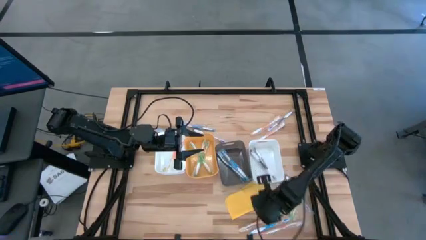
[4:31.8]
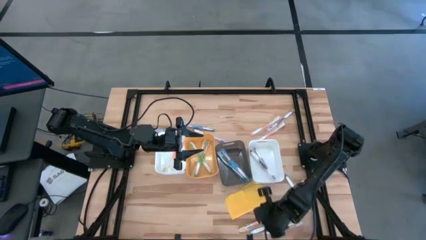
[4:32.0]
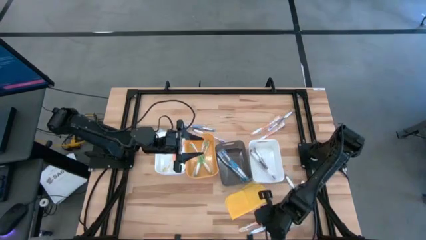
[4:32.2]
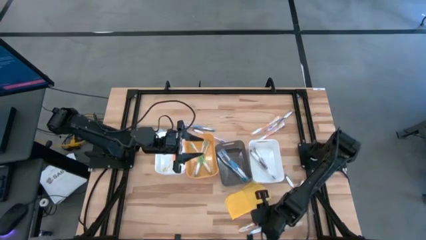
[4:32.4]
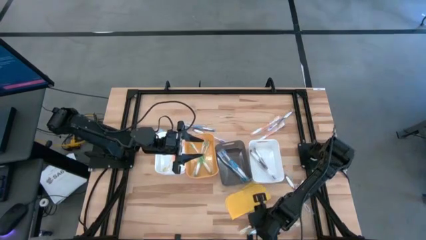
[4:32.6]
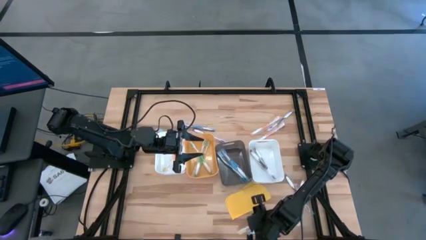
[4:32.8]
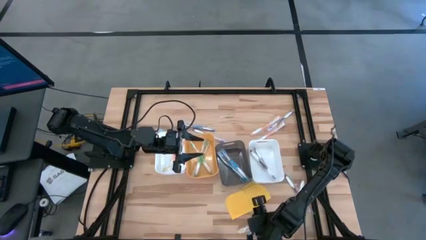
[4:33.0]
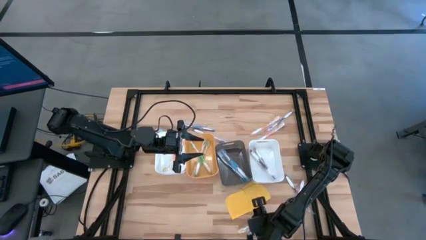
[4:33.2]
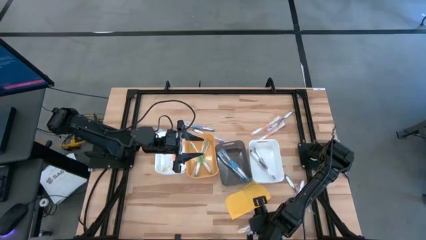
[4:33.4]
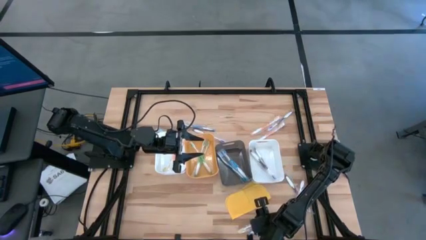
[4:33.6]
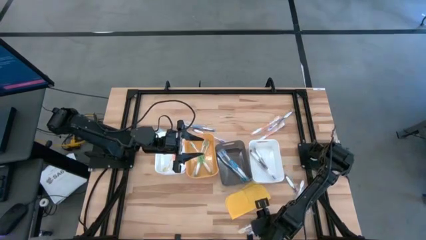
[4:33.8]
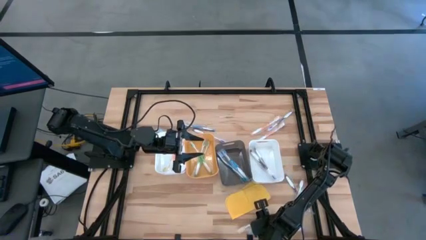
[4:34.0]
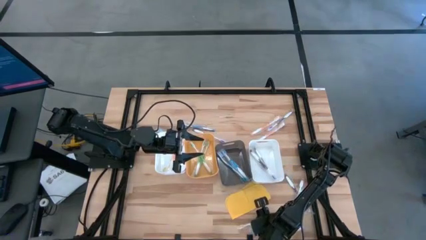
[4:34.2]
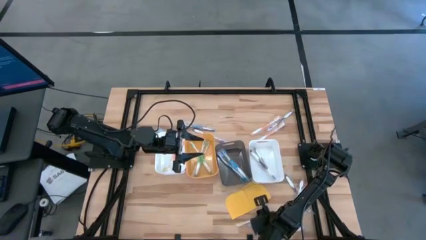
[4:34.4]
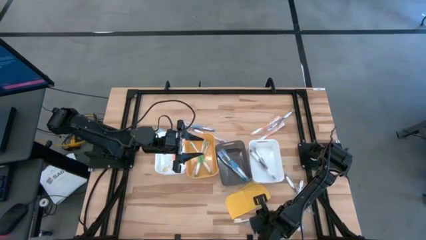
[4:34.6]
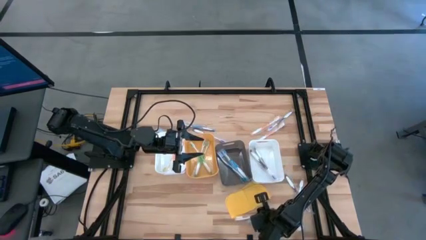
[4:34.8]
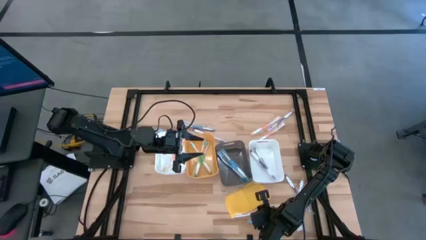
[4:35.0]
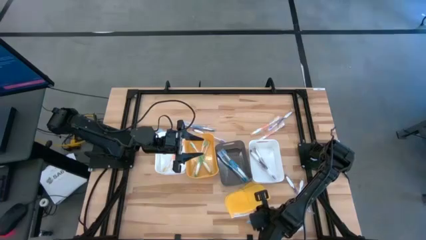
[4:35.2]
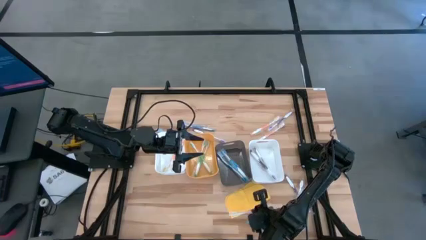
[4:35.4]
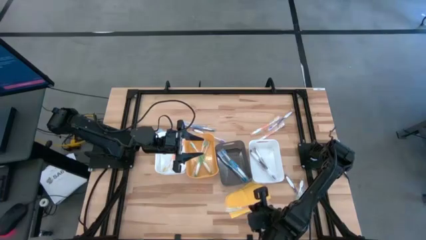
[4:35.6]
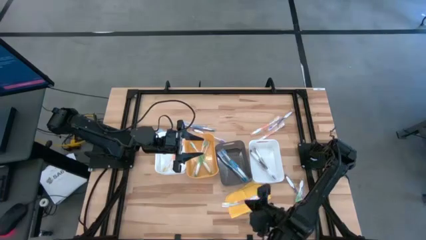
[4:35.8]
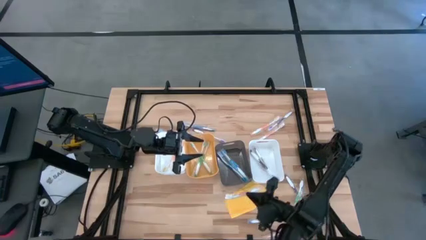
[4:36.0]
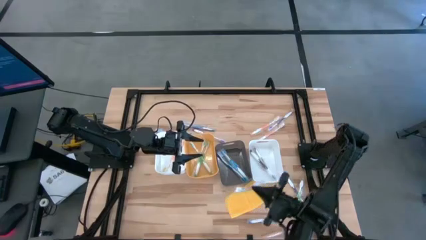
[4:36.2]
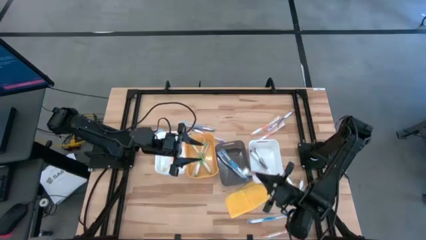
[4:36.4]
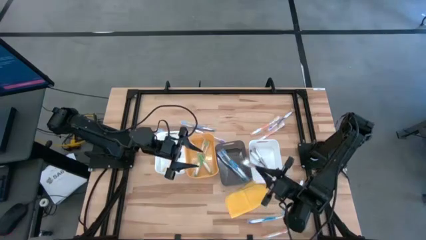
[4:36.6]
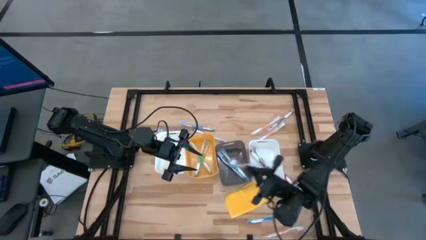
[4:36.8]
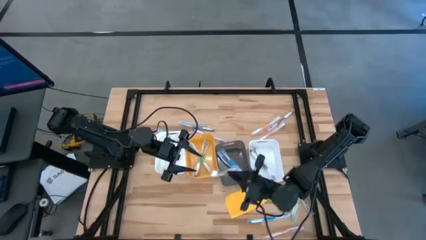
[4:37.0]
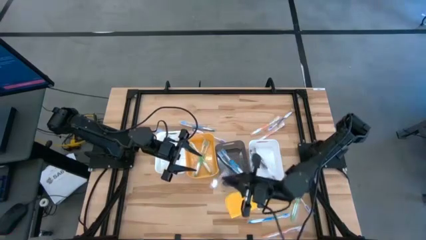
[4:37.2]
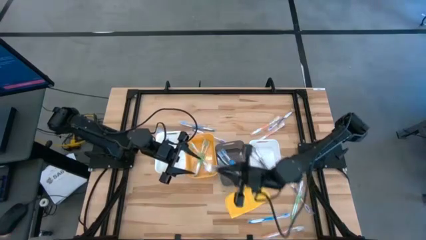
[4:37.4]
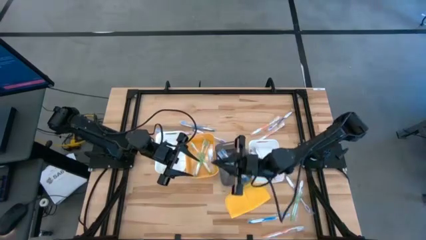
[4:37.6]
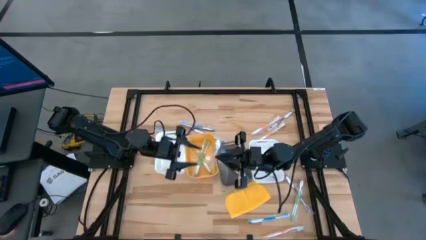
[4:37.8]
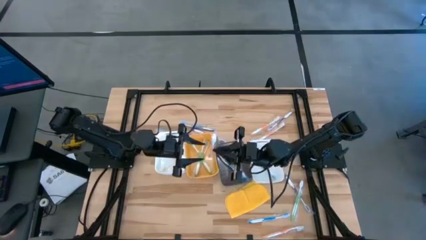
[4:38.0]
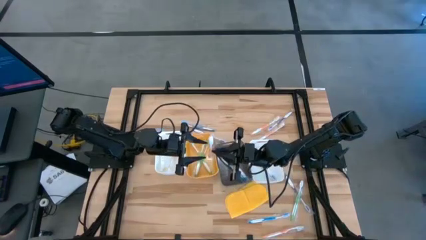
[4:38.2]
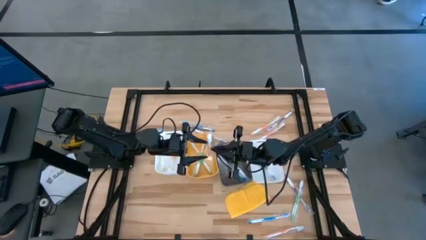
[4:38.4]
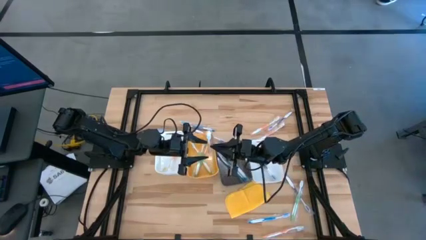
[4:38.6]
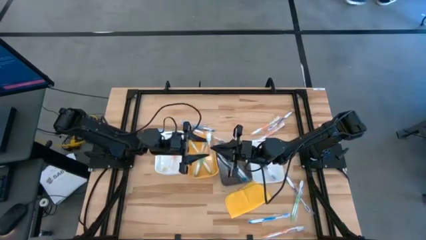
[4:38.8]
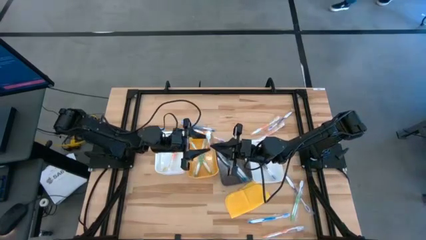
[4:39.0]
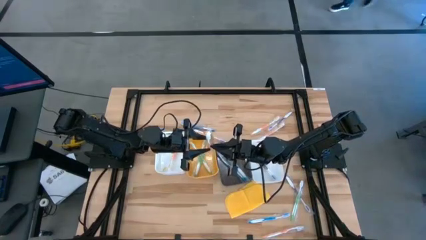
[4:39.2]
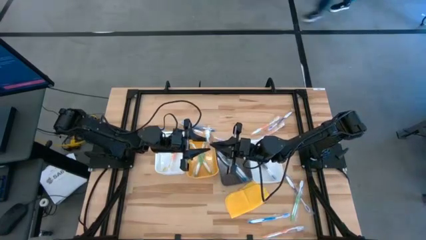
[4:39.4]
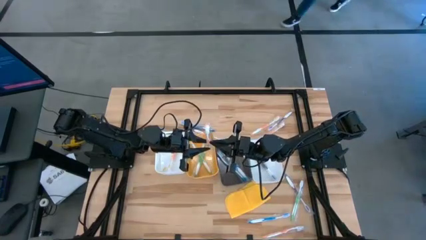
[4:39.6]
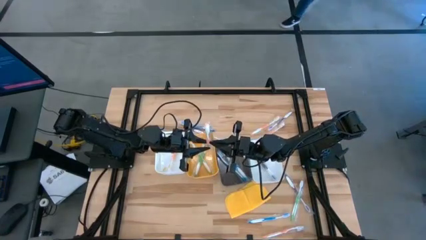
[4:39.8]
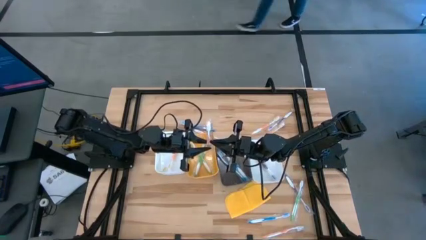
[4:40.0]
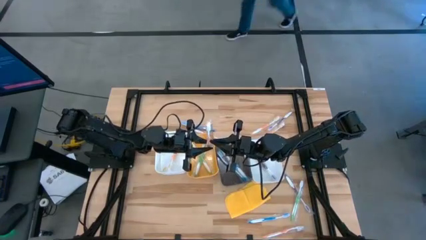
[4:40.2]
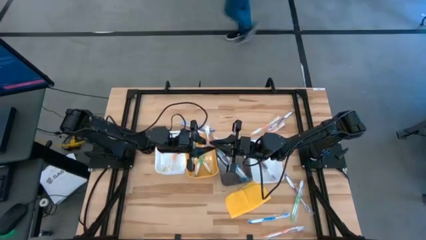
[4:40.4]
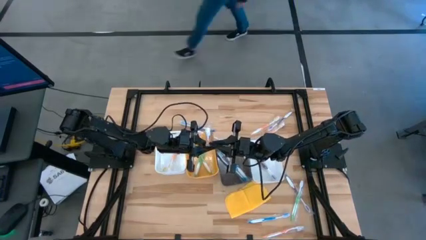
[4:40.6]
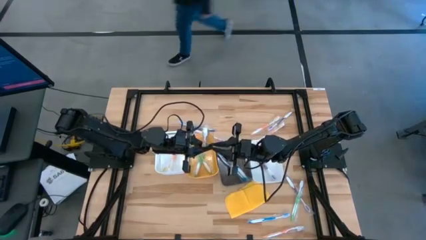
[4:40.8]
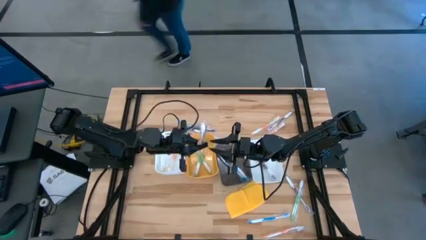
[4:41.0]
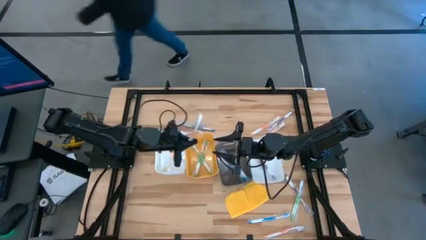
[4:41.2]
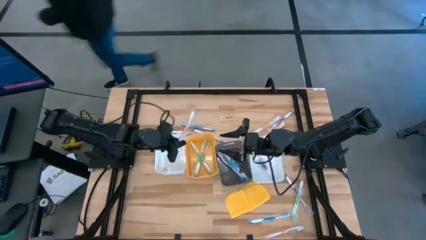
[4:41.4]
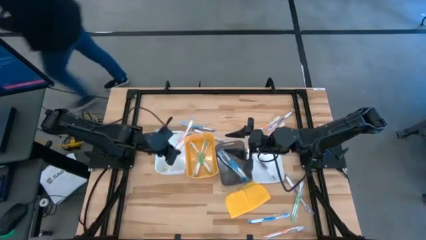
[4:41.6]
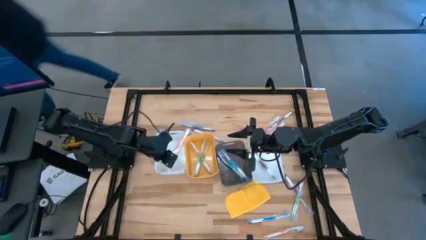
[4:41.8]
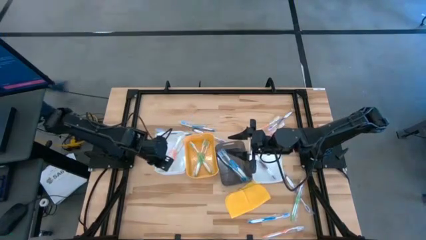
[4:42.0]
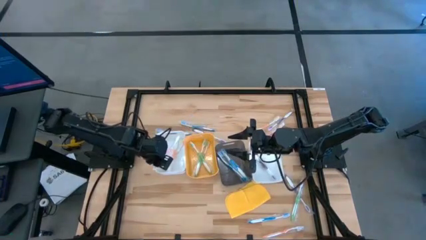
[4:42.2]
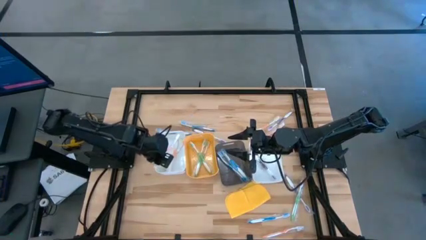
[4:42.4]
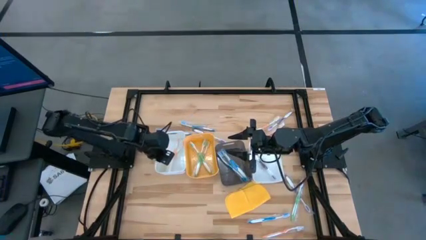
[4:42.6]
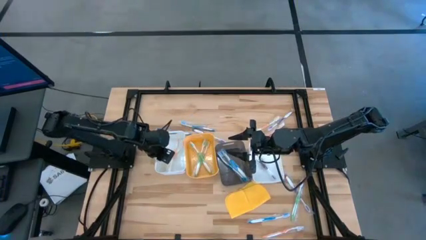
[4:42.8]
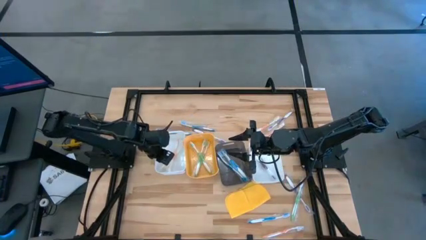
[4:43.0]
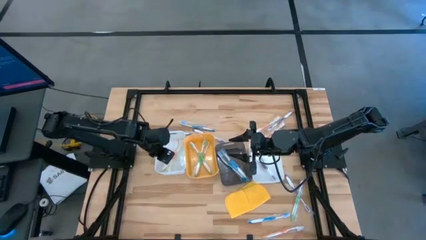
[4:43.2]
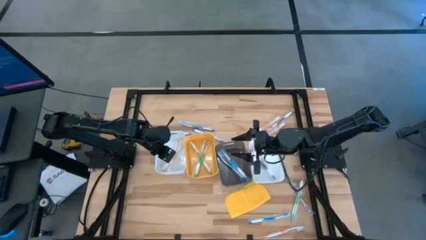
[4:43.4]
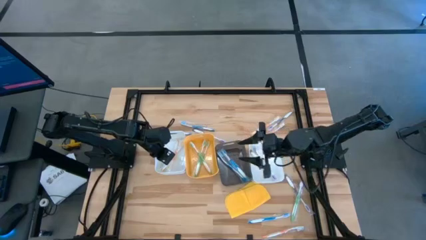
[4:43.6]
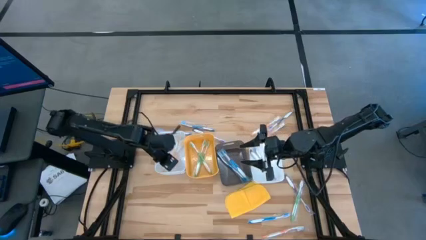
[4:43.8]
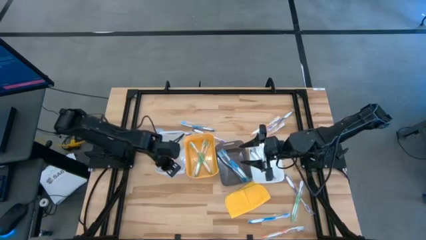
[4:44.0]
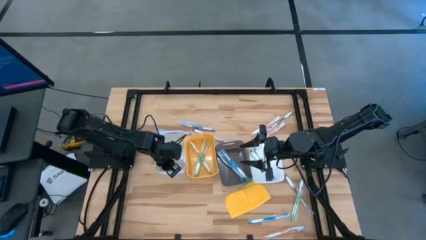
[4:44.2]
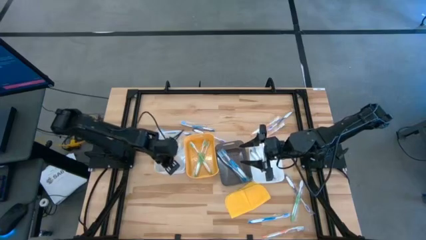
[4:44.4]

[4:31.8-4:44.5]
Task: Pick & Place Toothbrushes
Put the orange toothbrush into the left white bin
